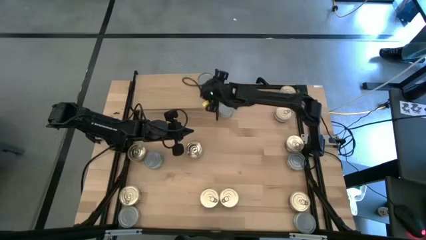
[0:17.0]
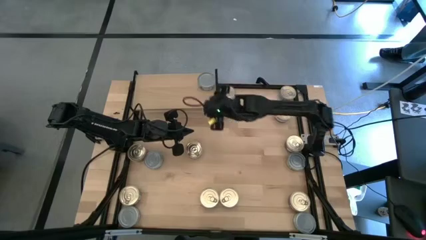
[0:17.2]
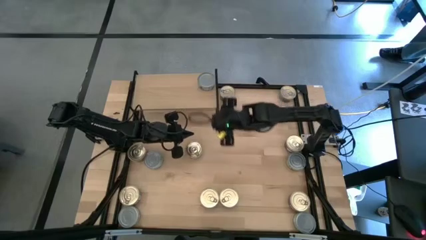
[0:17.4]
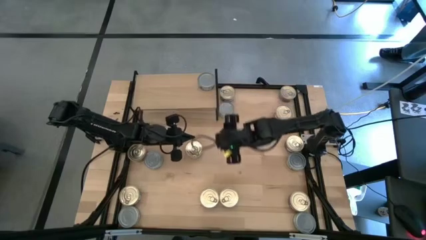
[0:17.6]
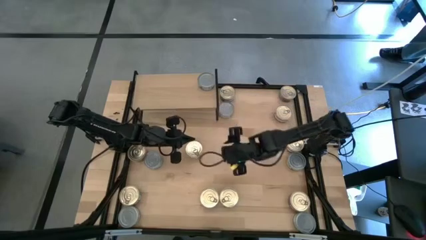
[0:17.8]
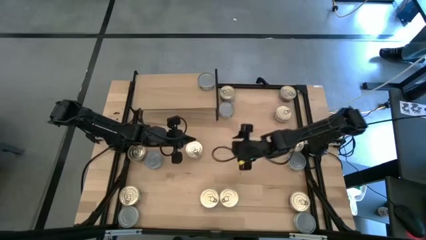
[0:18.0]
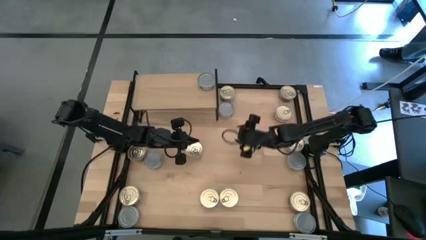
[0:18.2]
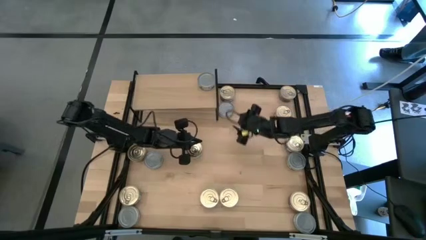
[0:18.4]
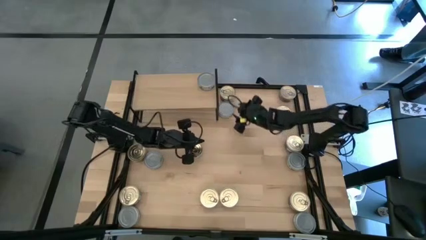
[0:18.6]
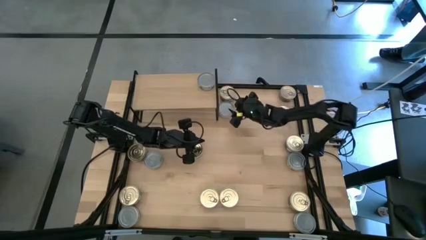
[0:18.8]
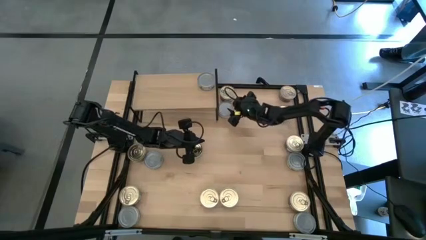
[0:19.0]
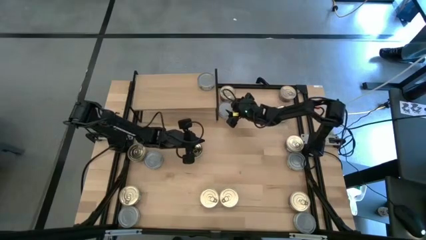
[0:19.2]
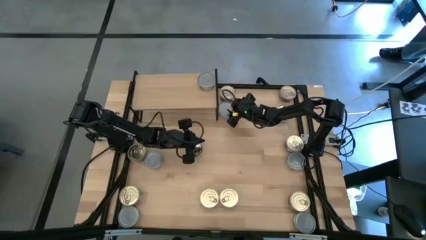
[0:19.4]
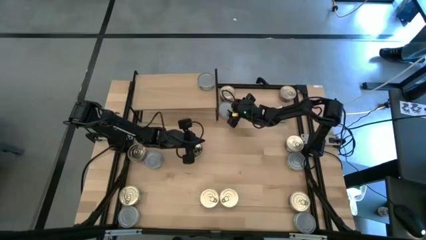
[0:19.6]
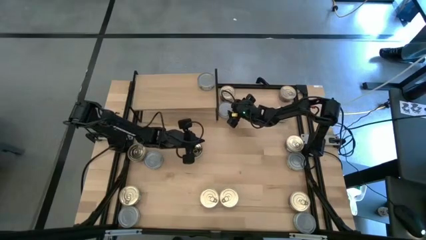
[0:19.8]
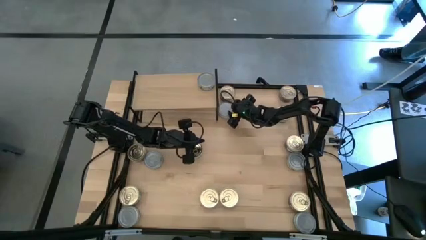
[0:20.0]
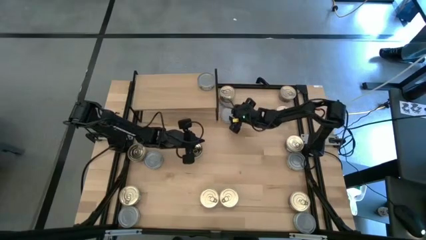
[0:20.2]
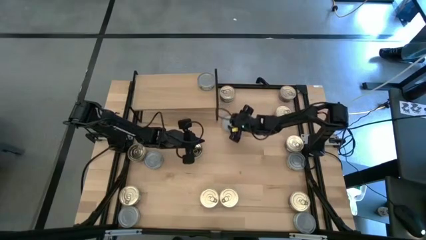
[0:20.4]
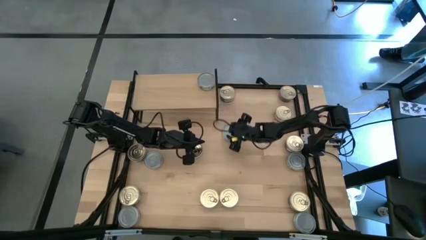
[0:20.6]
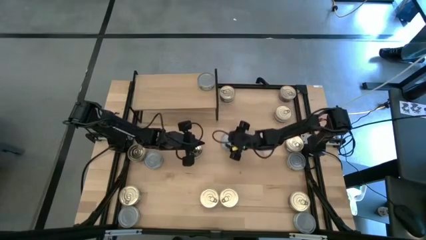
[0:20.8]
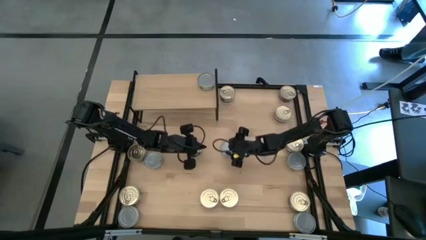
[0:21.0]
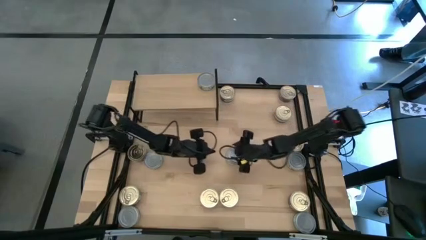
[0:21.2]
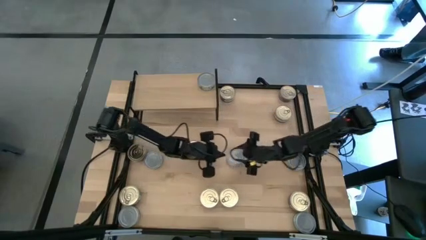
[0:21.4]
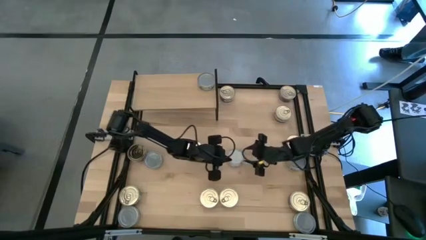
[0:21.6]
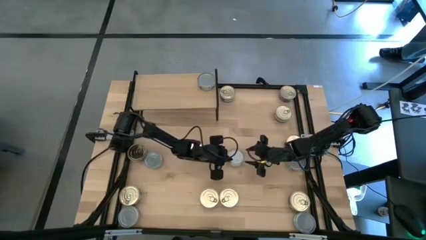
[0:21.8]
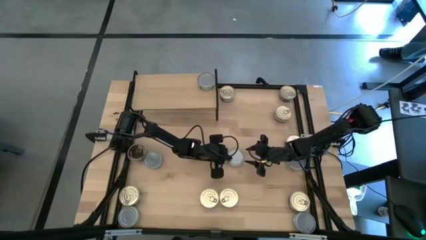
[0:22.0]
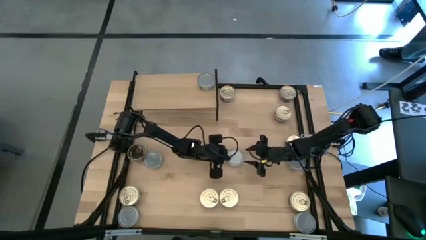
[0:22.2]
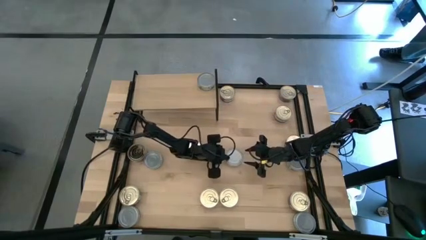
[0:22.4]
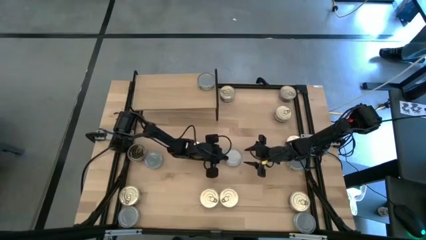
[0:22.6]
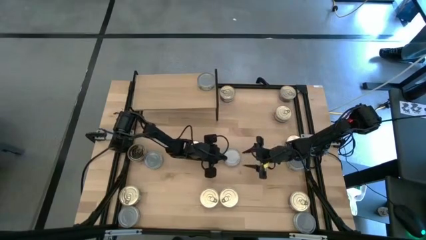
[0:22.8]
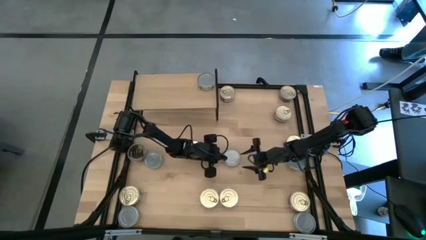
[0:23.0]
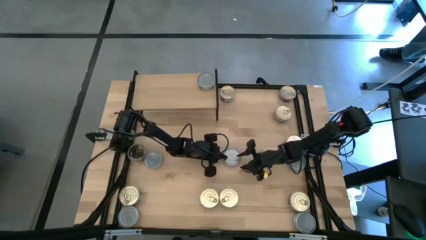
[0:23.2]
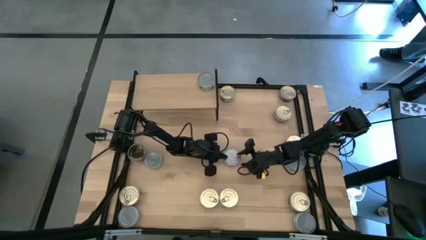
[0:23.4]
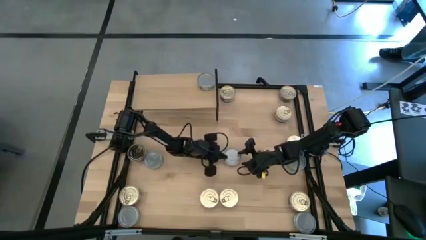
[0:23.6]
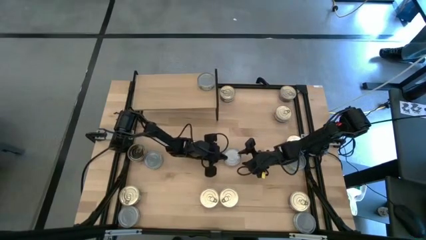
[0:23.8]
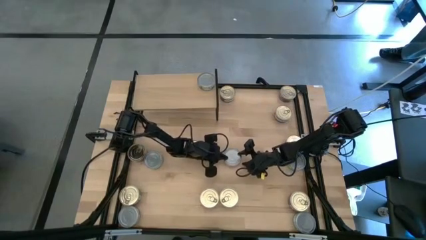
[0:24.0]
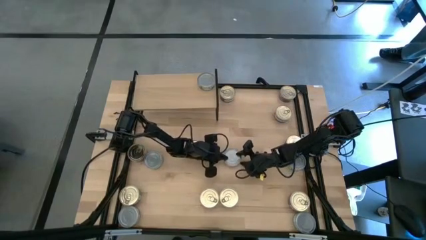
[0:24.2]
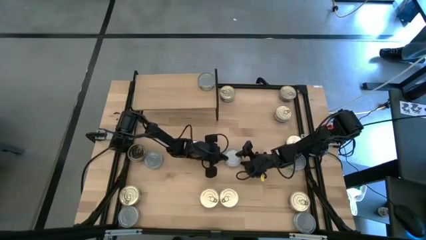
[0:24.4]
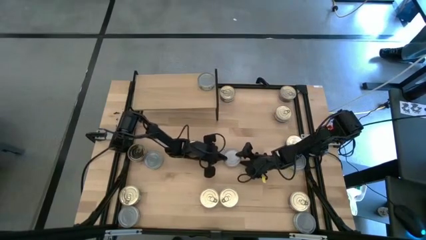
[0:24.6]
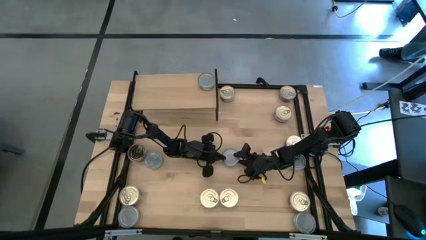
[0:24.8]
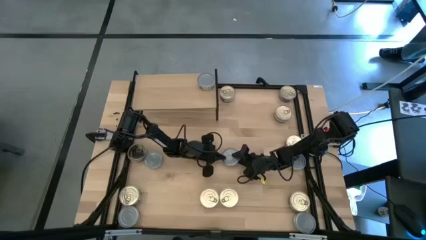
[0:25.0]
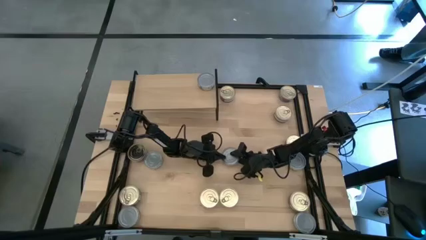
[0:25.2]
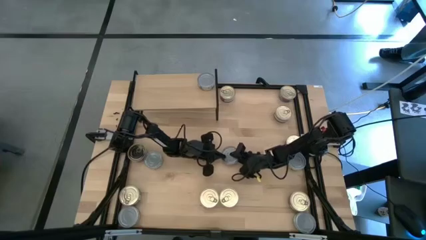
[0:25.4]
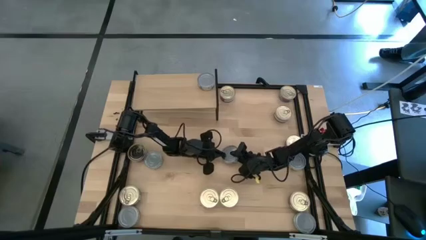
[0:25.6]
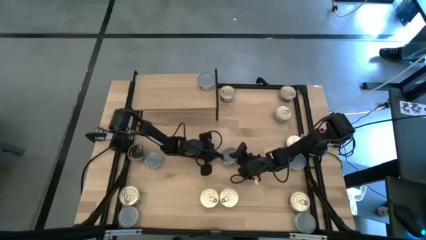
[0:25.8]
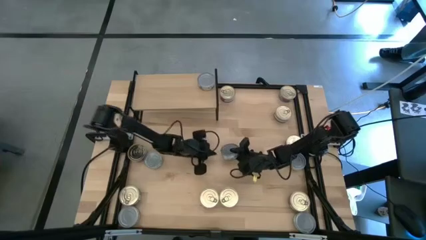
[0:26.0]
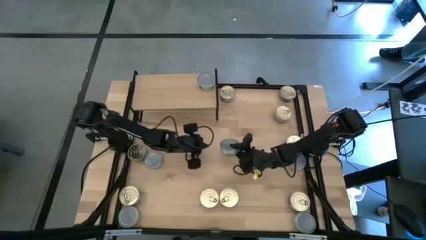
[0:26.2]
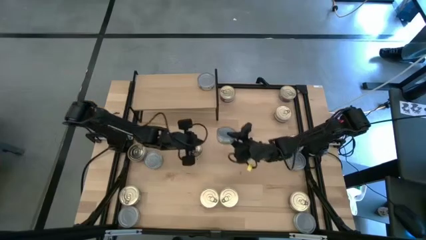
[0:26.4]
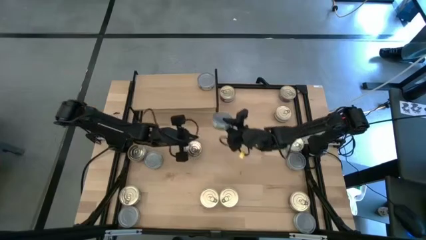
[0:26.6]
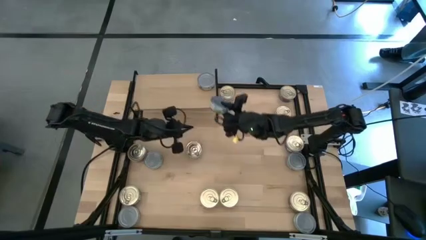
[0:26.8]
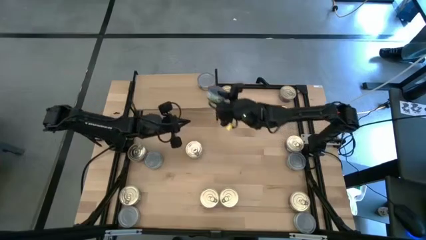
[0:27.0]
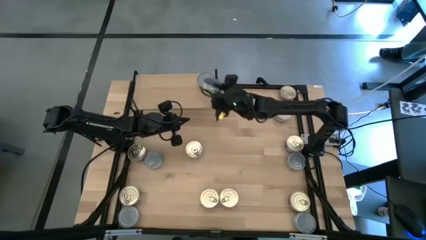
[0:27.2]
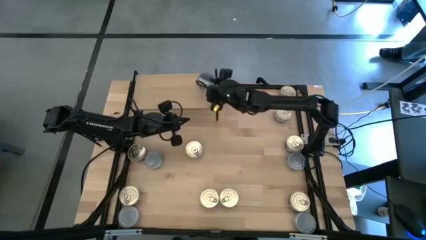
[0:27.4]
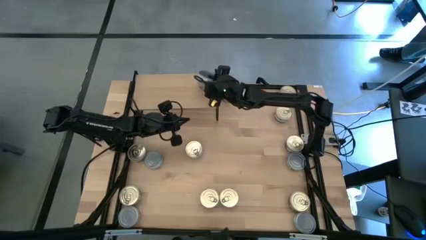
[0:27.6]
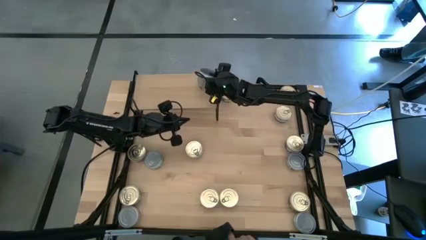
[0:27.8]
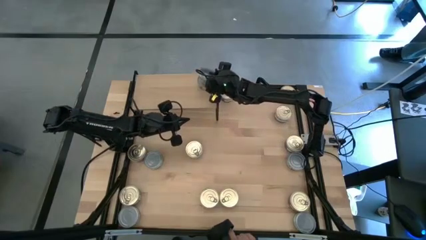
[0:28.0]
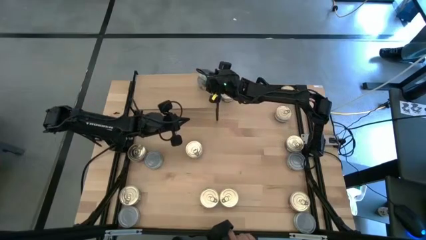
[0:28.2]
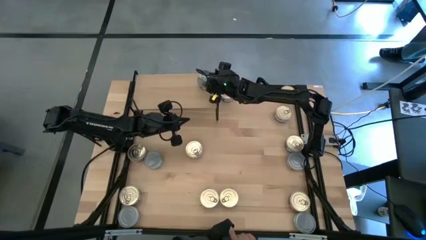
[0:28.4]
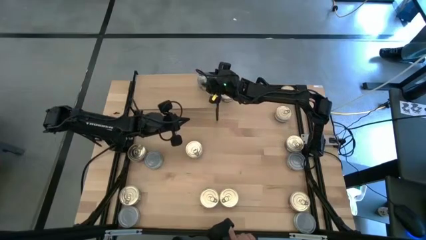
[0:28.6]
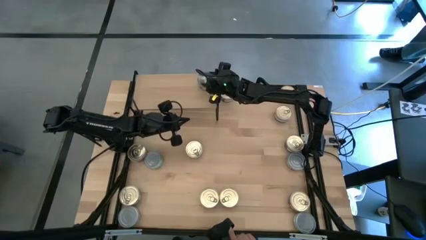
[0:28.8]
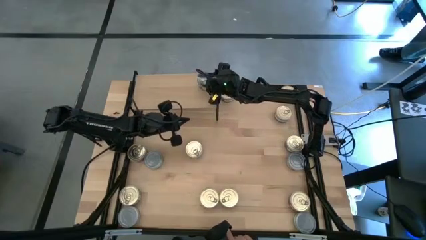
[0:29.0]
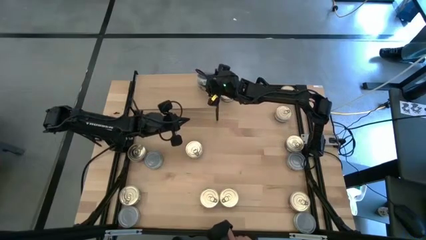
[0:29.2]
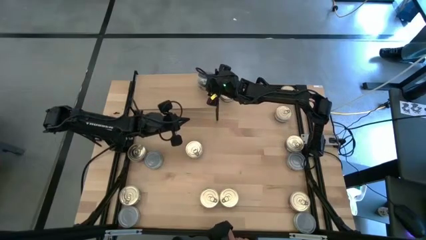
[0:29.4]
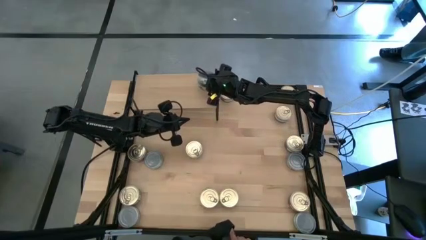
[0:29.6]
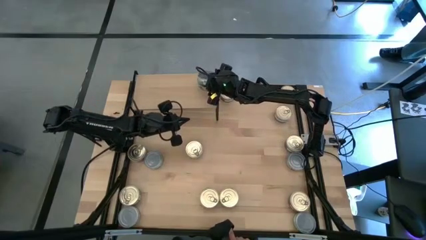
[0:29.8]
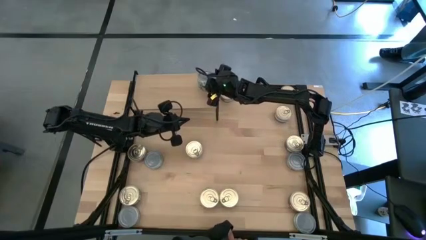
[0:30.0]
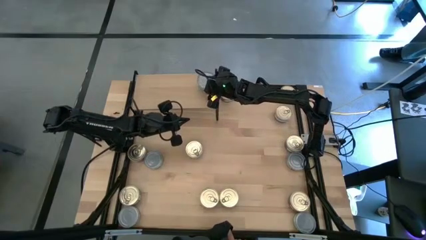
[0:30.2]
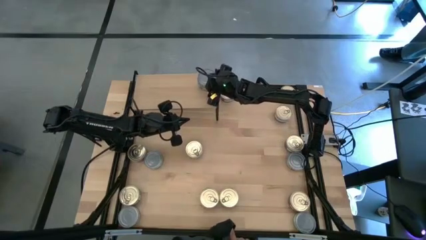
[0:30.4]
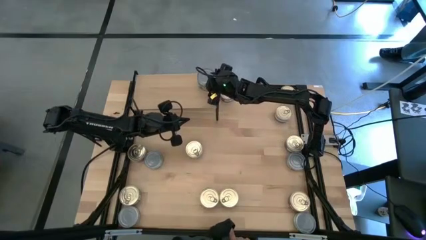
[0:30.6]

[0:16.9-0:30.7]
Task: Stack canned seafood by type on shelf
Stack the green tuna can on top of the green tuna can on the shelf
